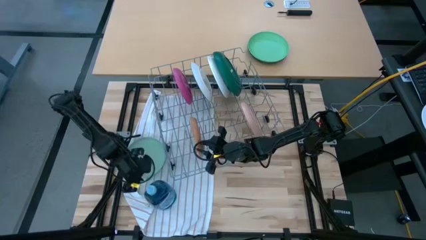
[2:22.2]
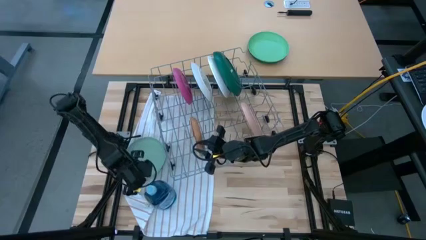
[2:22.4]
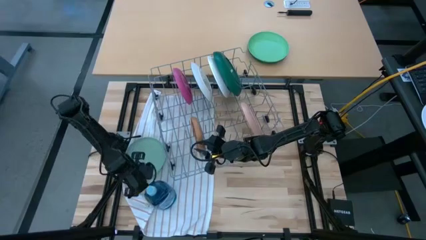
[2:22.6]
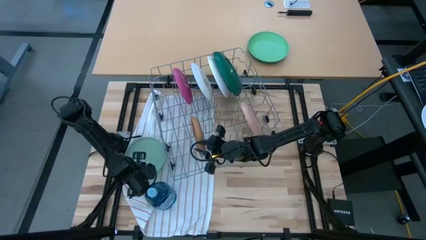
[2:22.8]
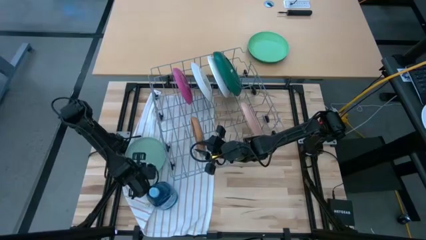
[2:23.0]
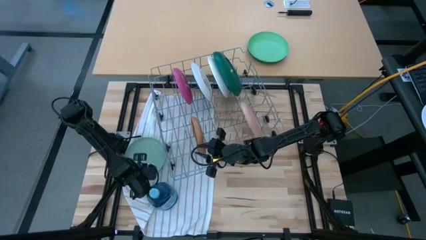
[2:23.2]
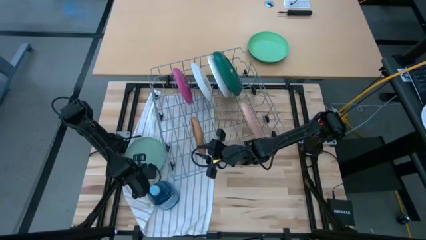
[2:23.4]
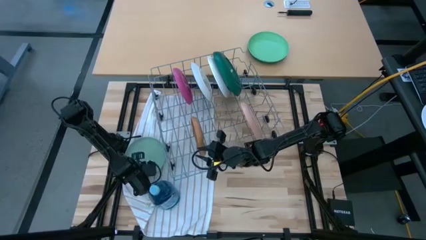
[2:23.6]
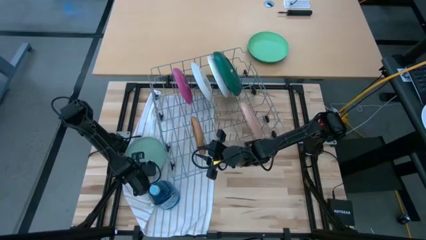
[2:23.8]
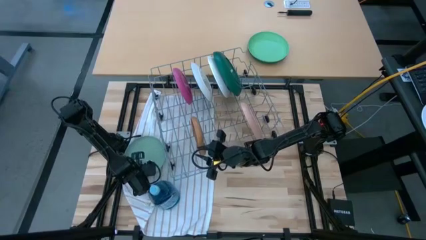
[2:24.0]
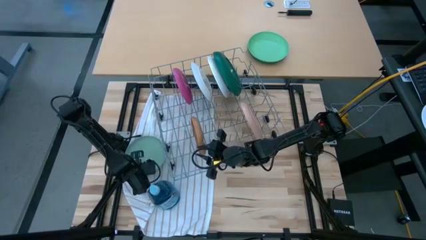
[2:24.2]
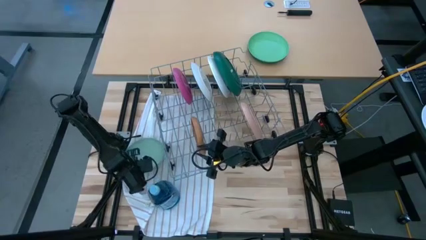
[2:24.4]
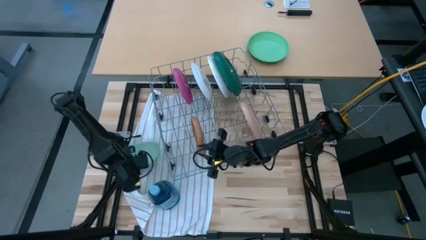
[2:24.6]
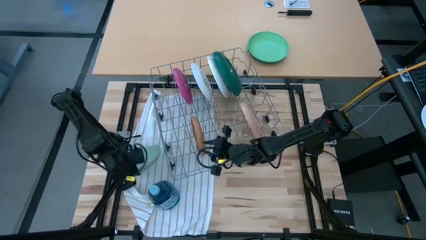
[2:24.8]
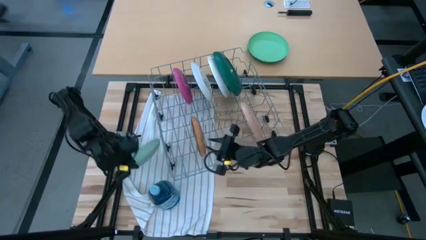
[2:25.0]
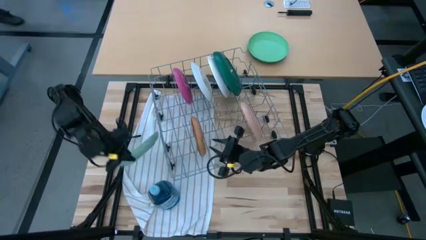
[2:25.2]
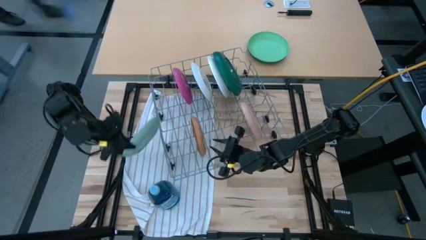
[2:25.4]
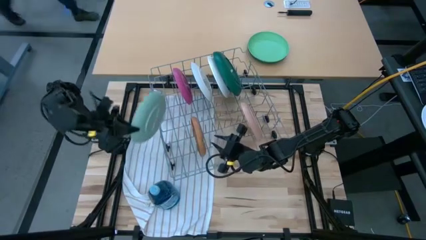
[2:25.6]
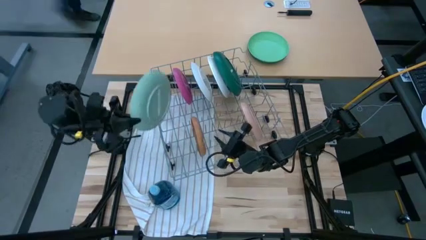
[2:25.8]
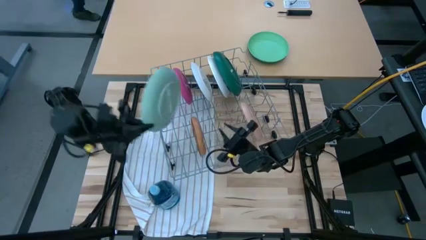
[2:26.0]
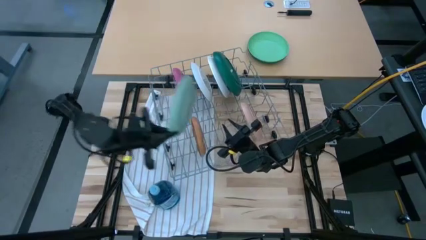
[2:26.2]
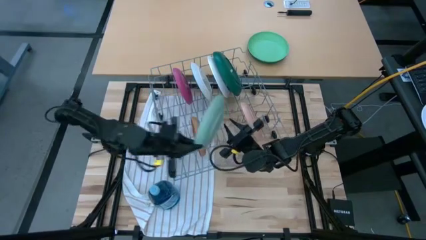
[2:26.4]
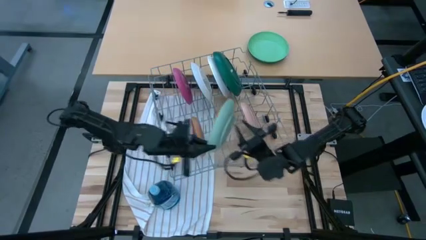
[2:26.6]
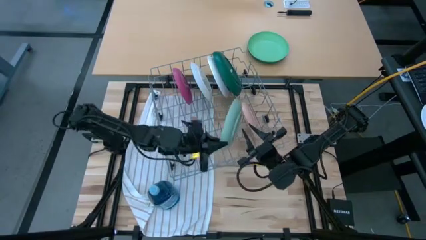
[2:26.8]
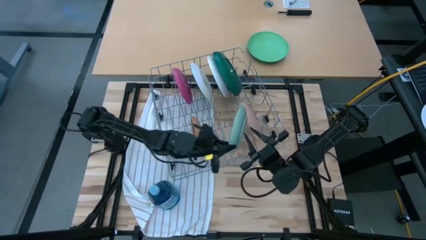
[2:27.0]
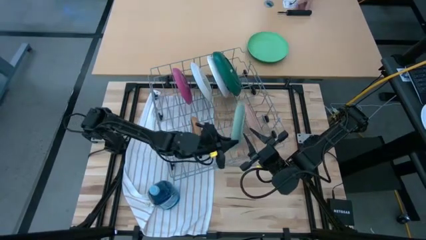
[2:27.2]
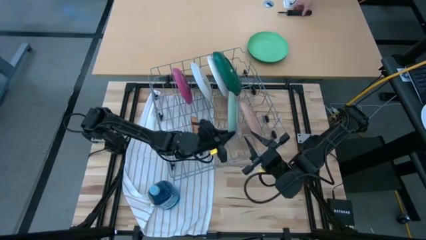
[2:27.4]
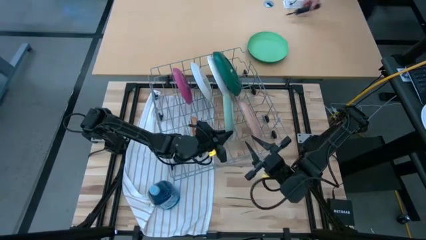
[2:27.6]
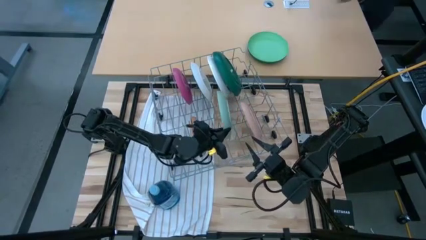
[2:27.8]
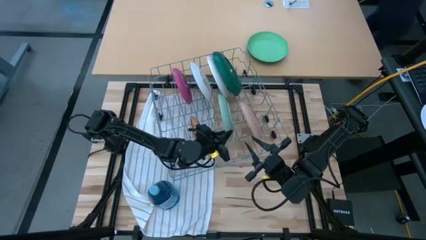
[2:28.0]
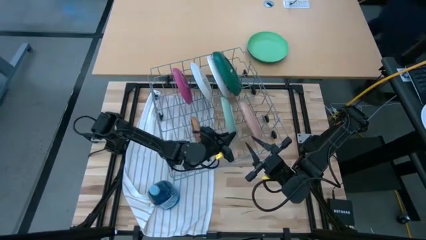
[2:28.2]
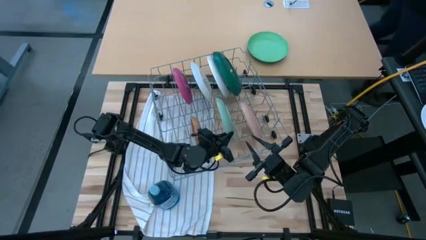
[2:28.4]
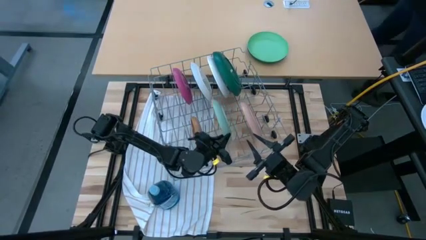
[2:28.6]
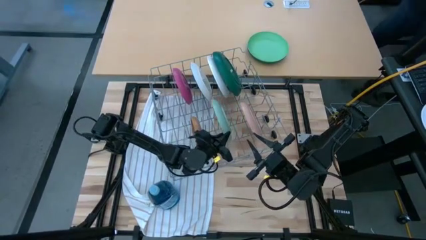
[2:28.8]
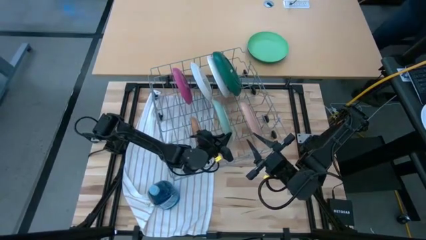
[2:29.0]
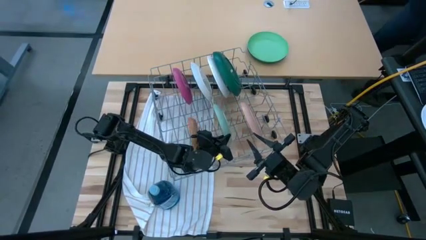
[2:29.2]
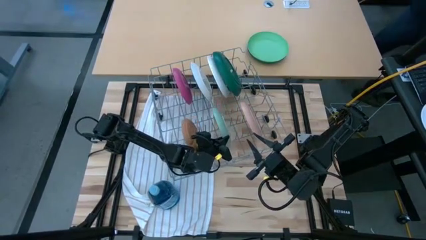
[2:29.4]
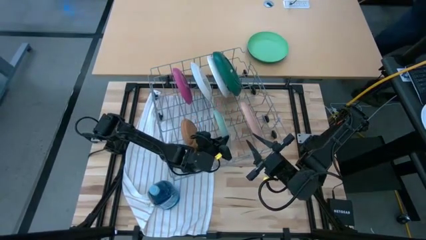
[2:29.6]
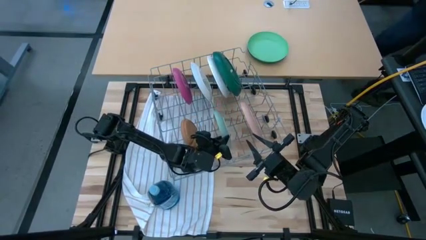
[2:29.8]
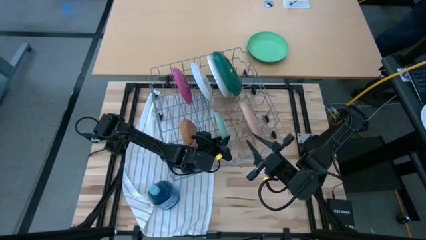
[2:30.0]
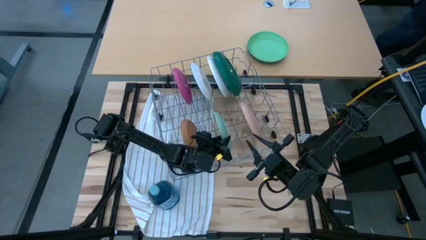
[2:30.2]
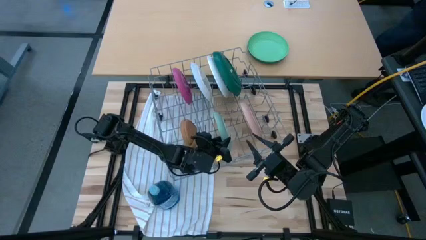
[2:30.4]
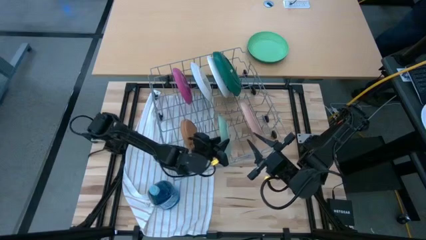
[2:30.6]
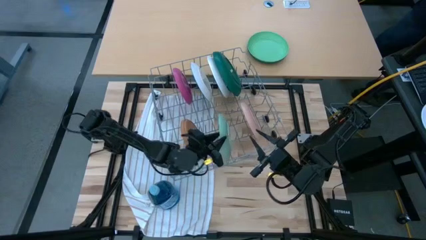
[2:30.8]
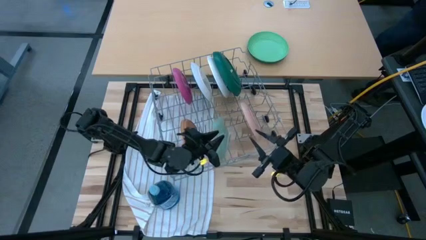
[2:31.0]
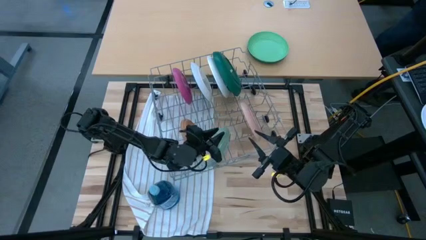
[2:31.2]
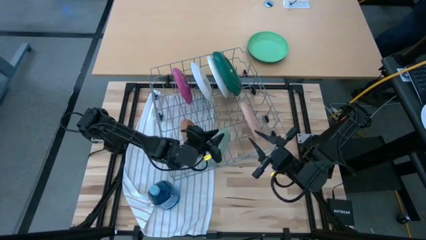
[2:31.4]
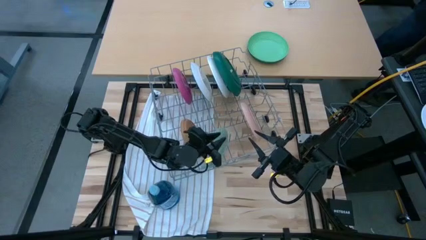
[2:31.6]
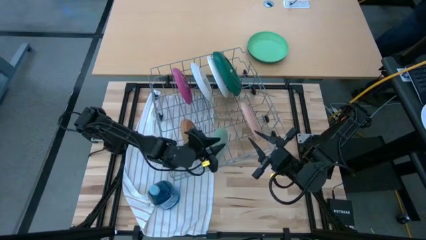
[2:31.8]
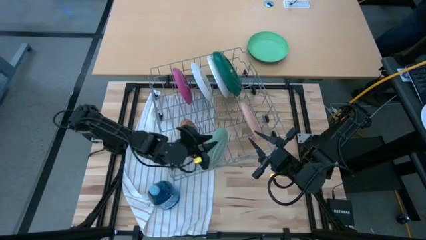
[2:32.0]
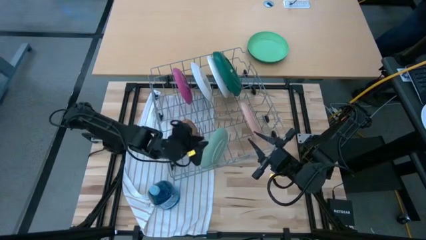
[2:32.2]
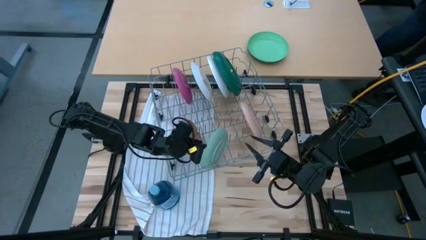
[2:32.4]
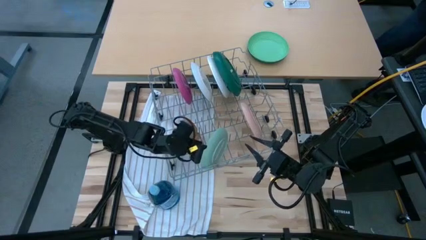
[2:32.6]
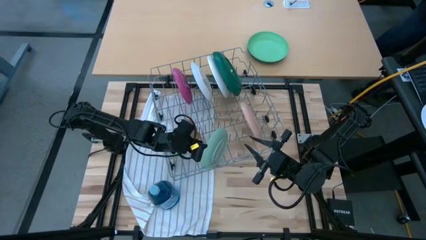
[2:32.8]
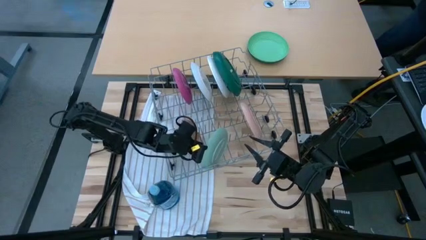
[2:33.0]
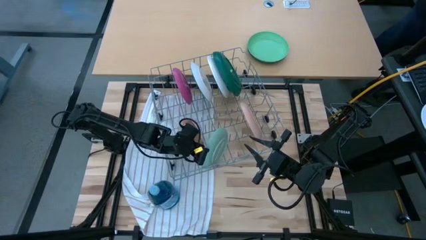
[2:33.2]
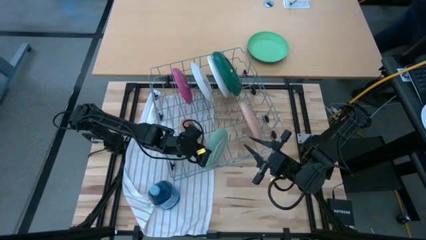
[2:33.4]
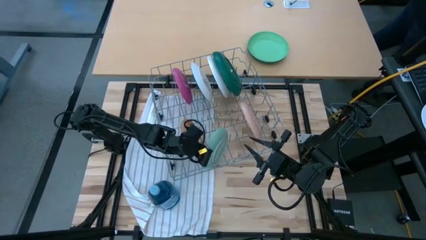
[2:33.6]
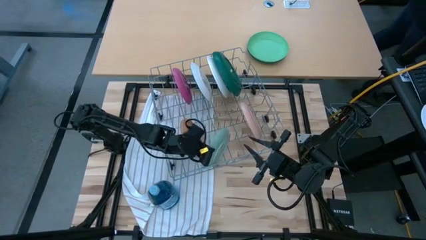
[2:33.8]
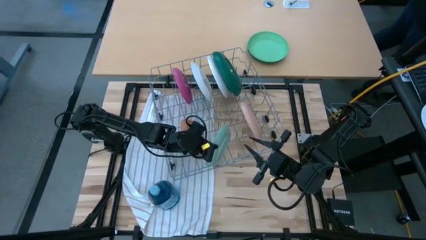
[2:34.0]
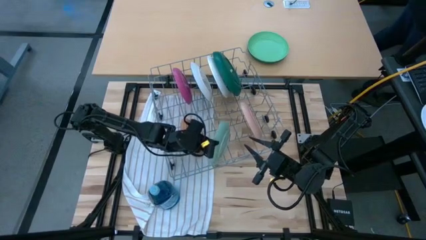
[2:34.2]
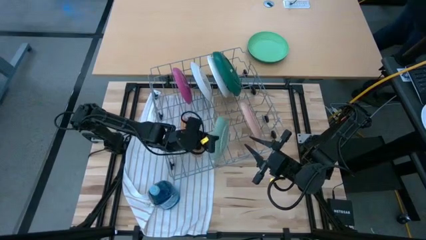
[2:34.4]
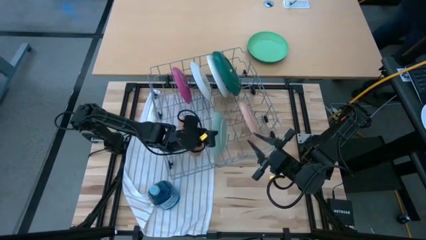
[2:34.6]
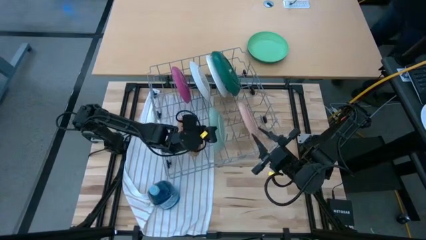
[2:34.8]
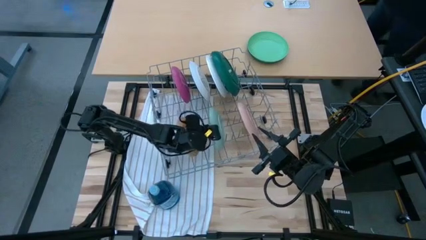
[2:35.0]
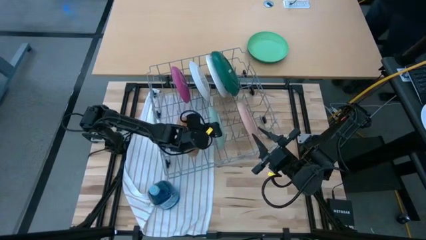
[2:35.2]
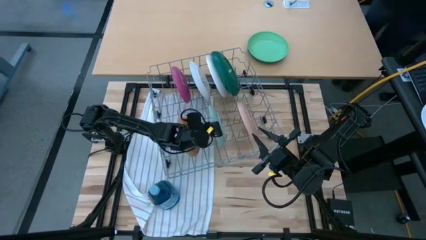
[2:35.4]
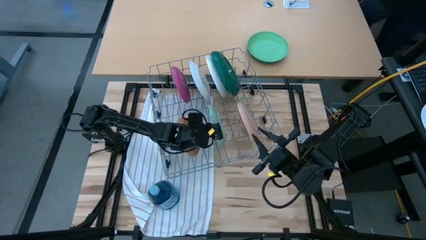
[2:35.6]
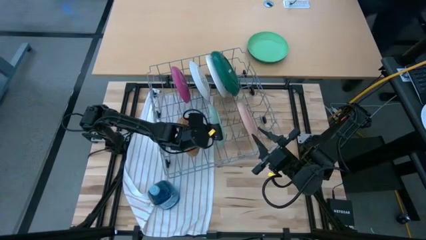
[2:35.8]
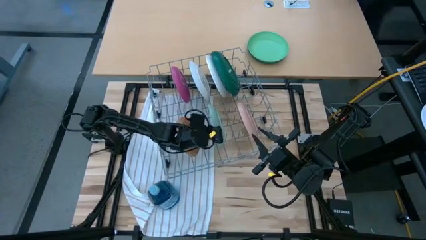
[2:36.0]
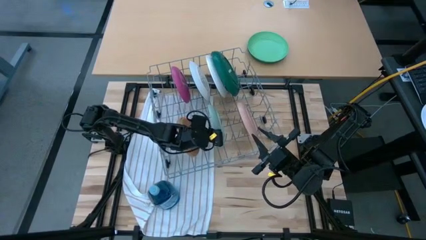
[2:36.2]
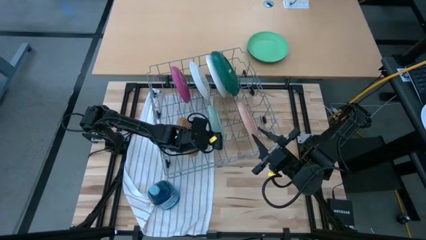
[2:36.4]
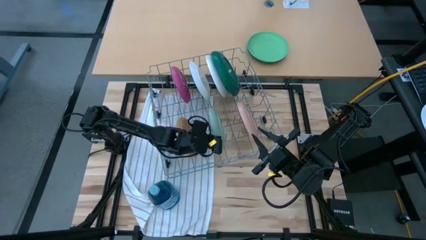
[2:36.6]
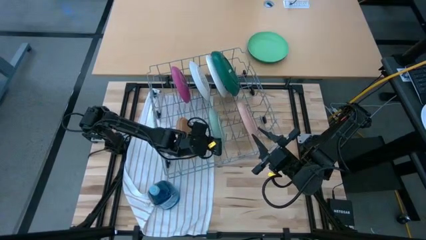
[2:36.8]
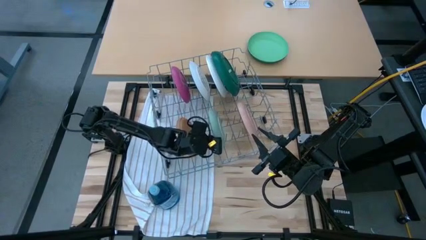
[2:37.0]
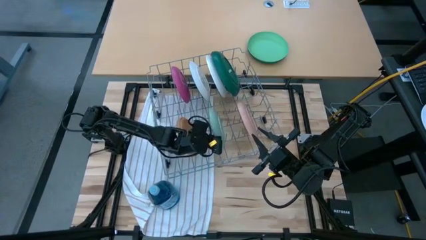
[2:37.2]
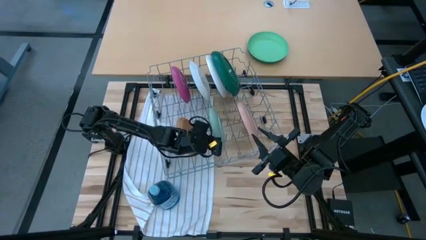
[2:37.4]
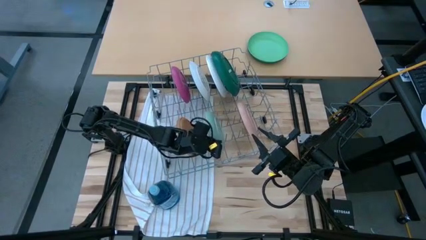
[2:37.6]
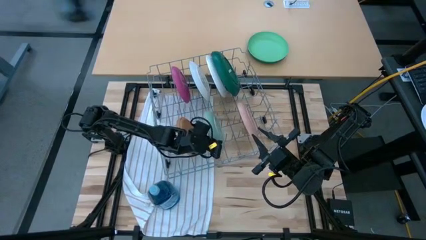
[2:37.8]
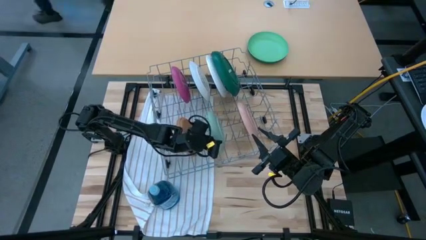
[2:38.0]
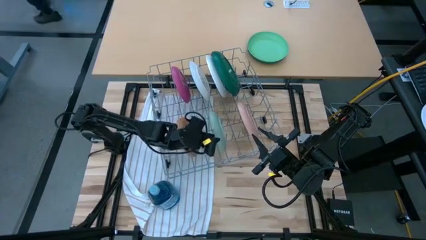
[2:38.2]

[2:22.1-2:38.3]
Task: Sort dishes
Put the light green plate into the dish rack

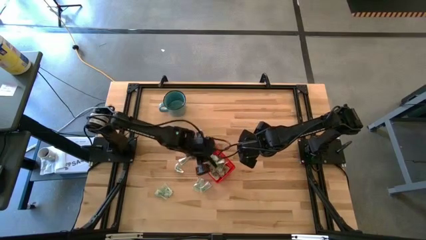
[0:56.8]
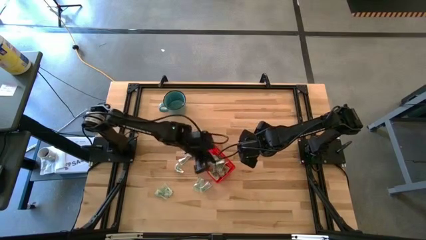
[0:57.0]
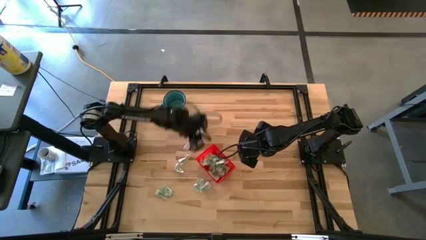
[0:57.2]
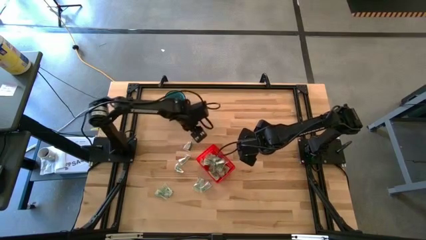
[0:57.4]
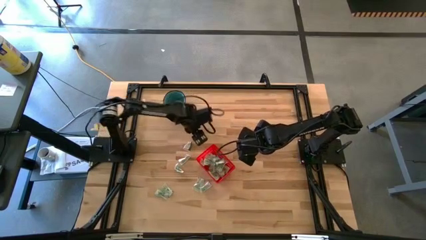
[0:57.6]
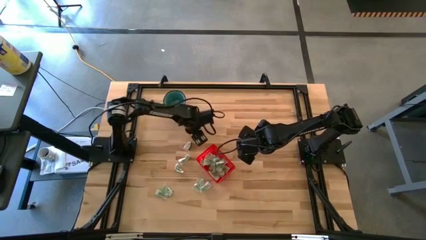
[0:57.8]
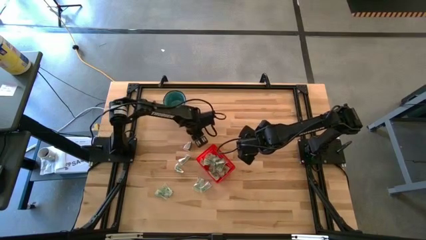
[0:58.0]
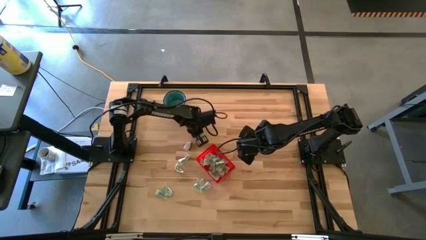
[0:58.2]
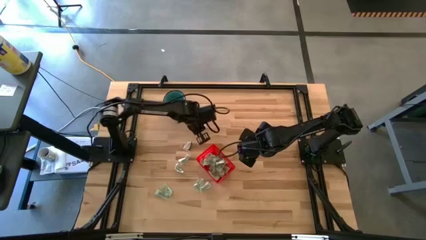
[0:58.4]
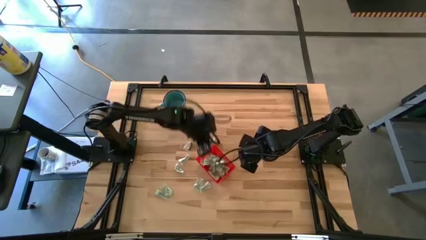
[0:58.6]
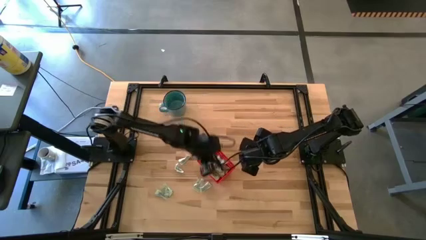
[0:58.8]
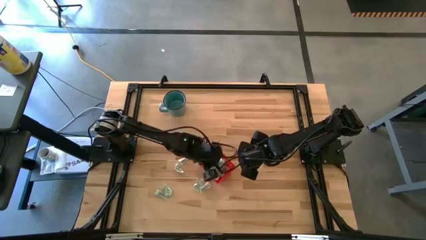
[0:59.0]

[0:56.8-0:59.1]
Task: Pick and place Stevia / Truvia into bins
Put the white stevia packet into the basket
